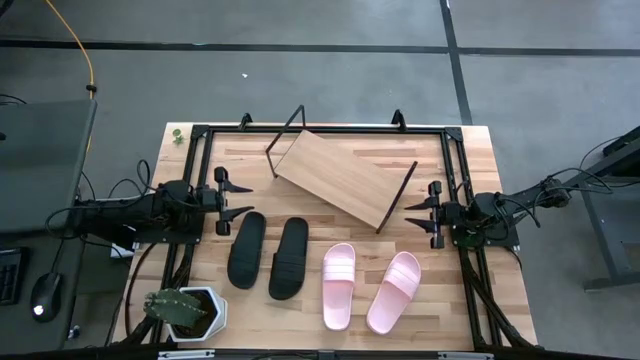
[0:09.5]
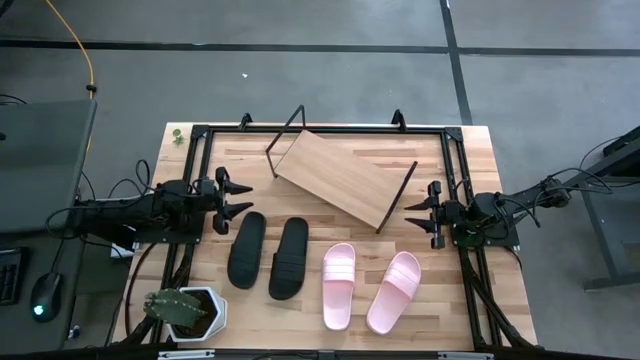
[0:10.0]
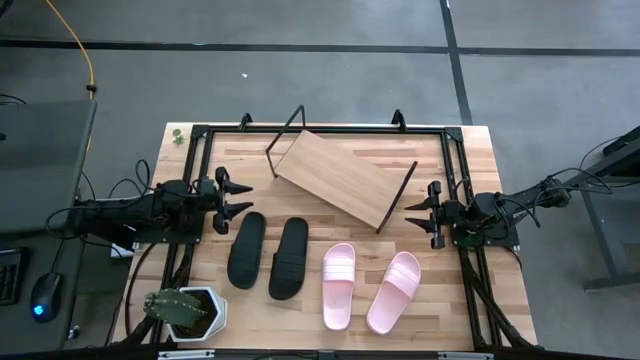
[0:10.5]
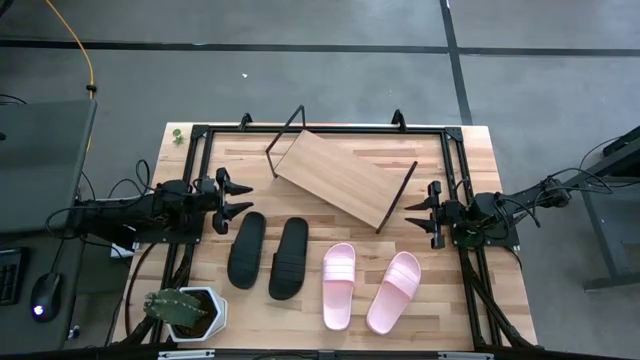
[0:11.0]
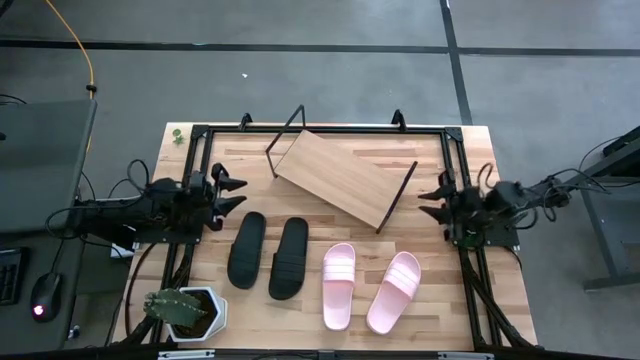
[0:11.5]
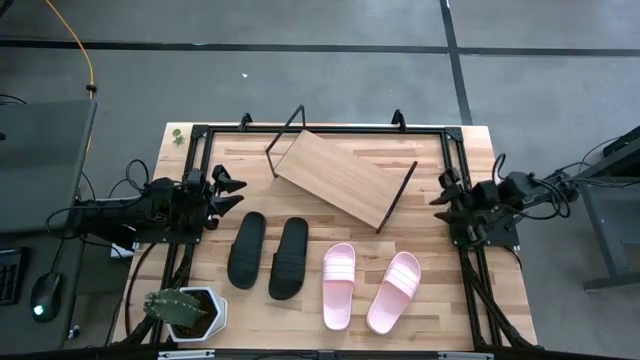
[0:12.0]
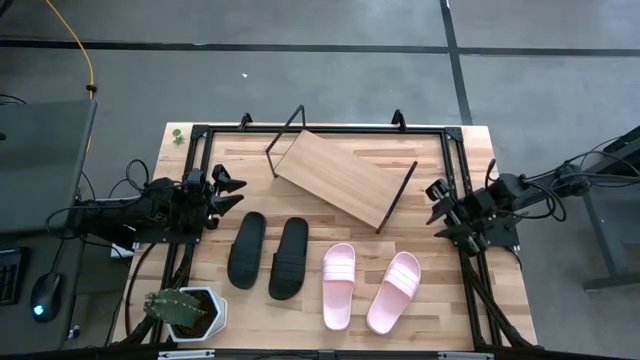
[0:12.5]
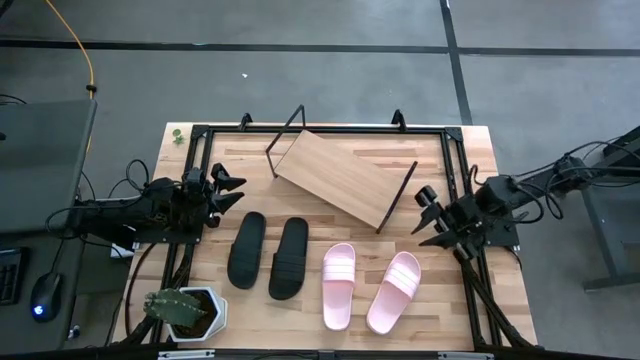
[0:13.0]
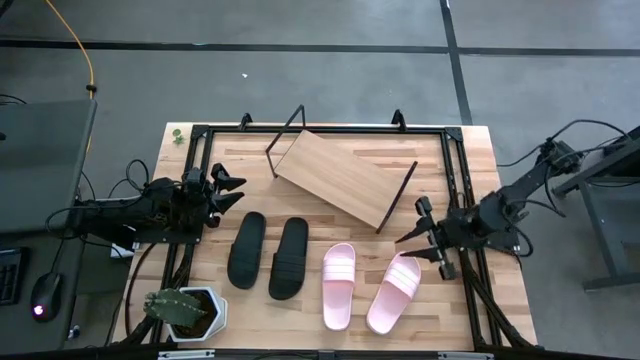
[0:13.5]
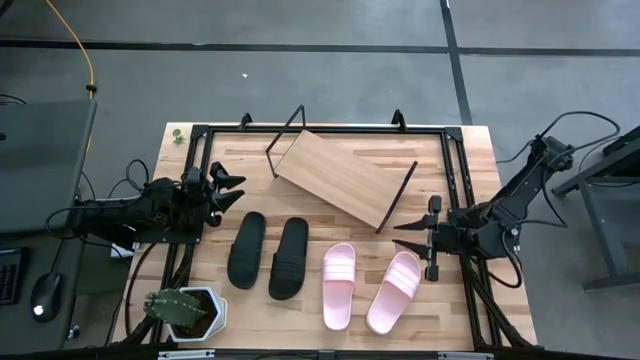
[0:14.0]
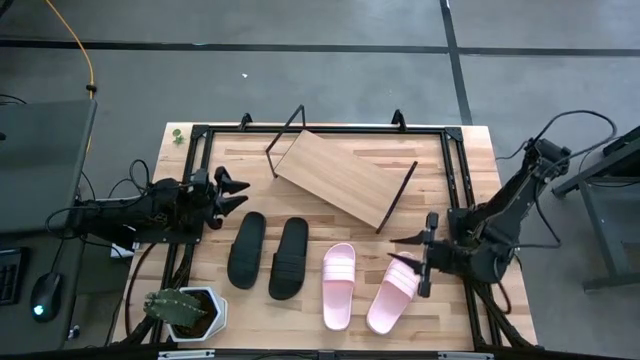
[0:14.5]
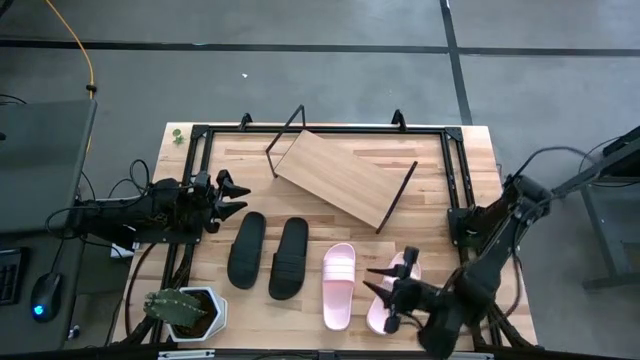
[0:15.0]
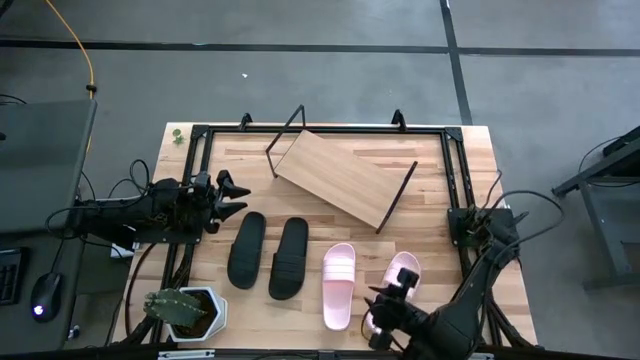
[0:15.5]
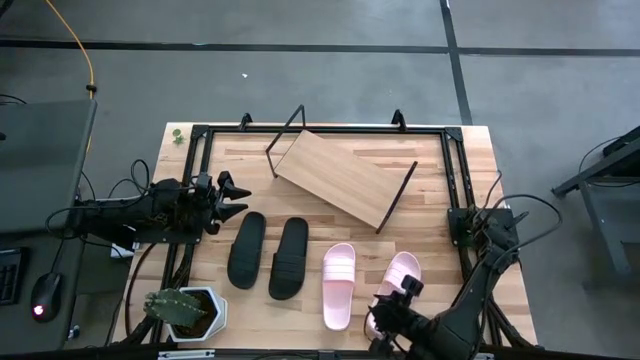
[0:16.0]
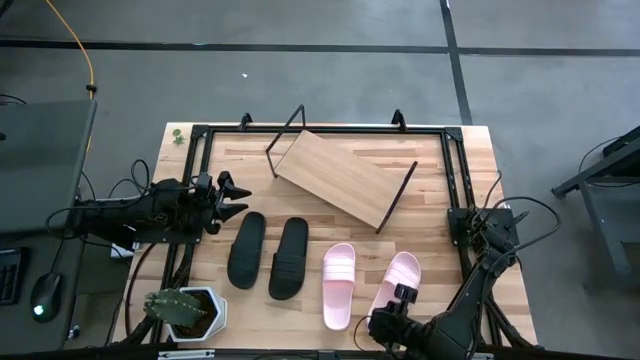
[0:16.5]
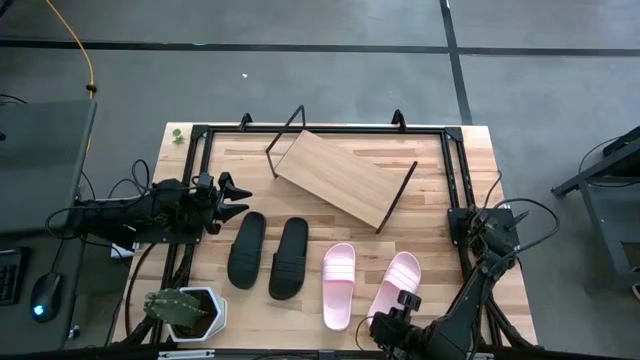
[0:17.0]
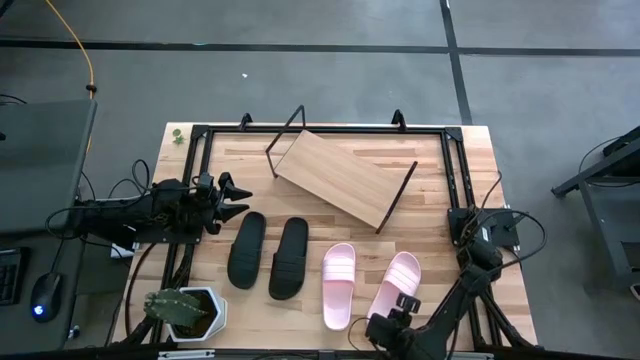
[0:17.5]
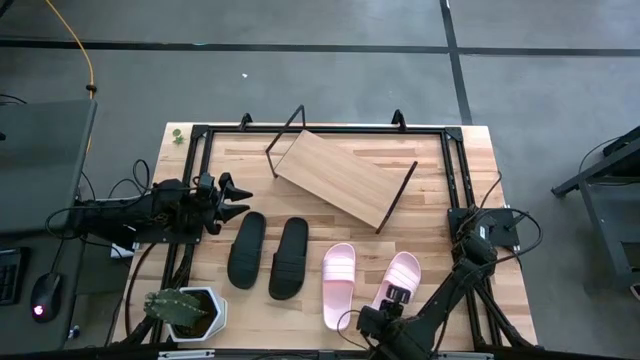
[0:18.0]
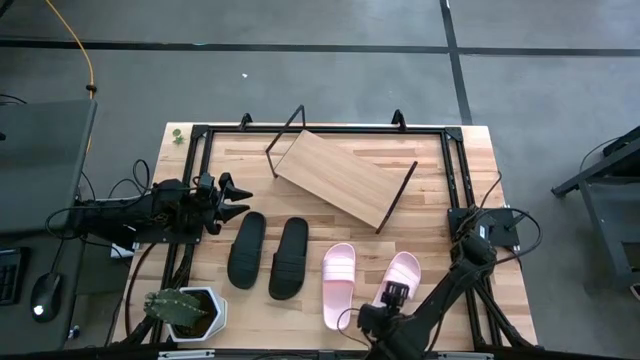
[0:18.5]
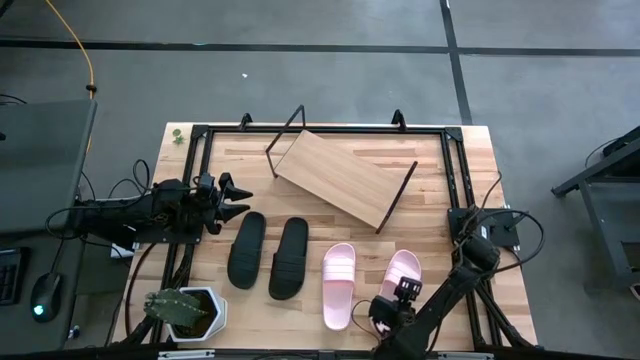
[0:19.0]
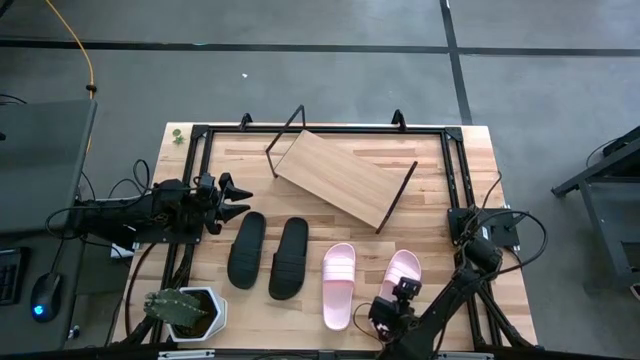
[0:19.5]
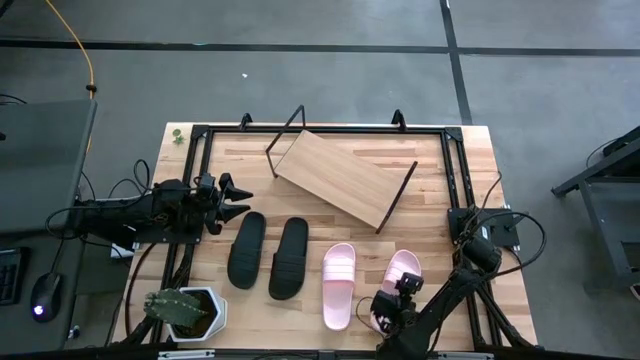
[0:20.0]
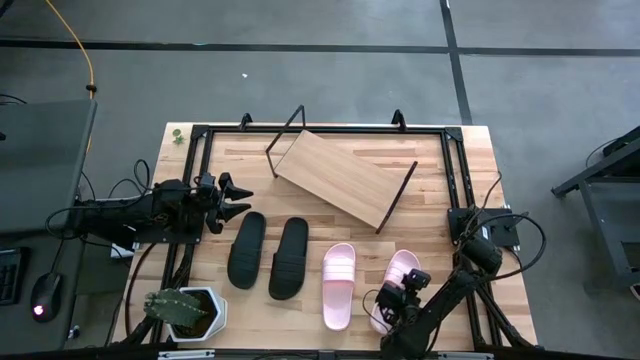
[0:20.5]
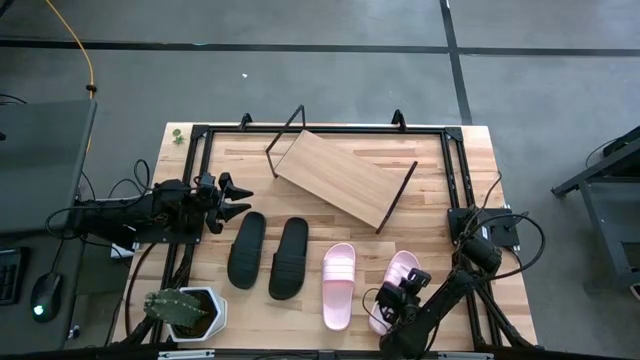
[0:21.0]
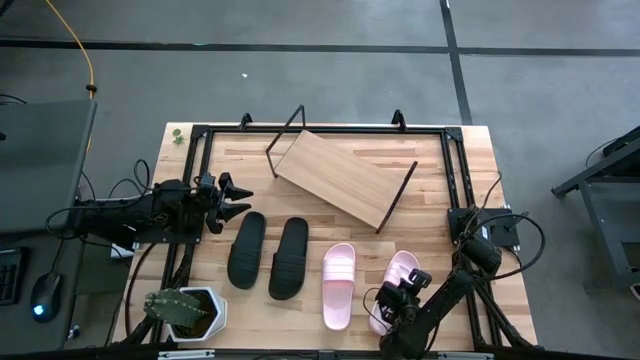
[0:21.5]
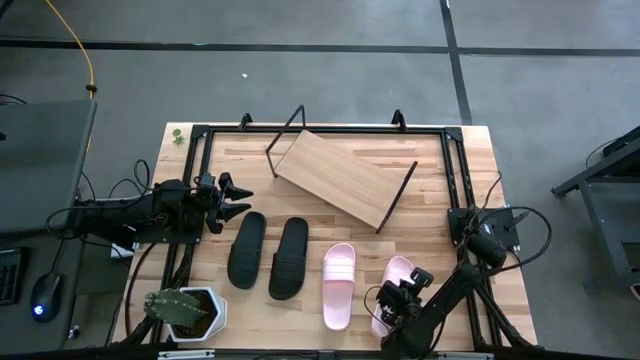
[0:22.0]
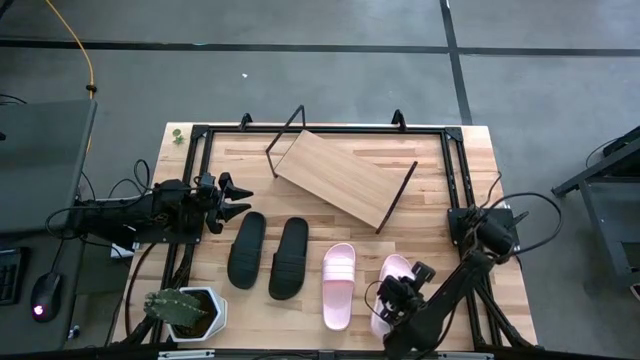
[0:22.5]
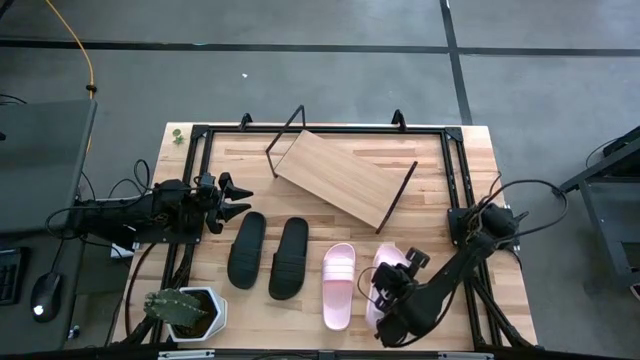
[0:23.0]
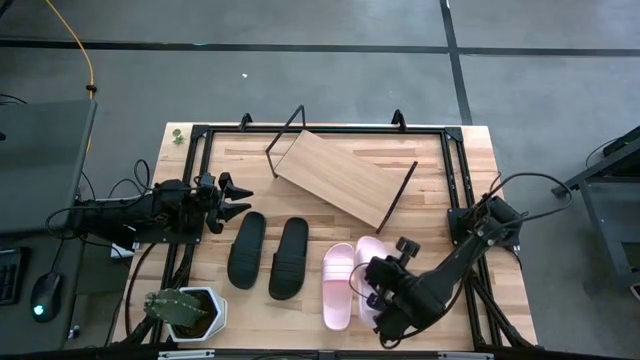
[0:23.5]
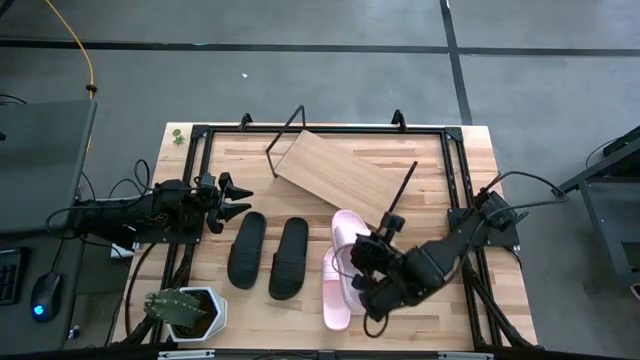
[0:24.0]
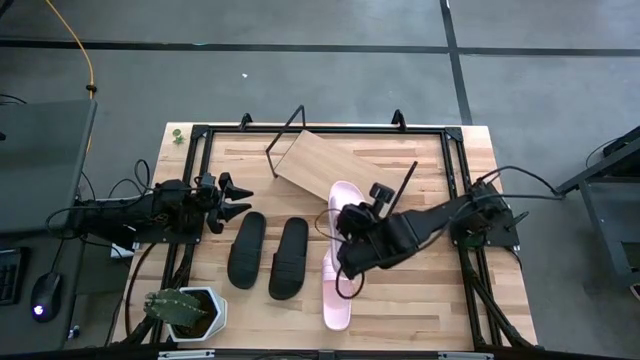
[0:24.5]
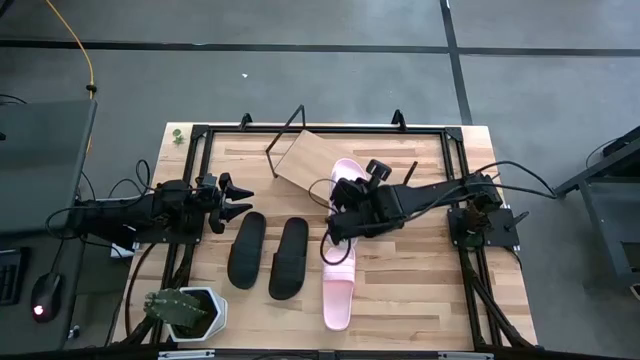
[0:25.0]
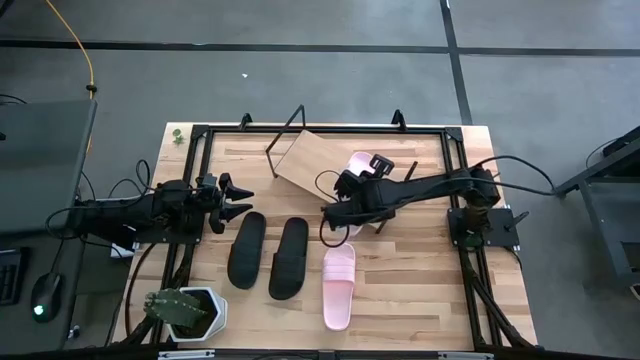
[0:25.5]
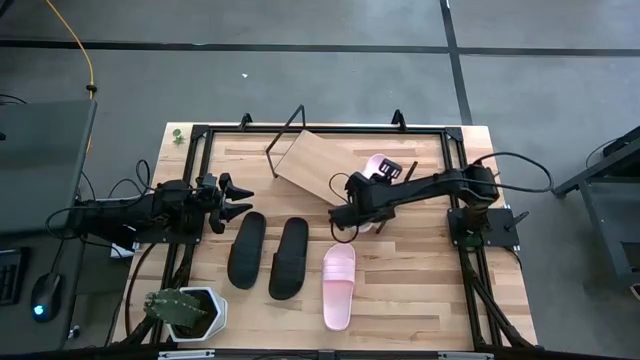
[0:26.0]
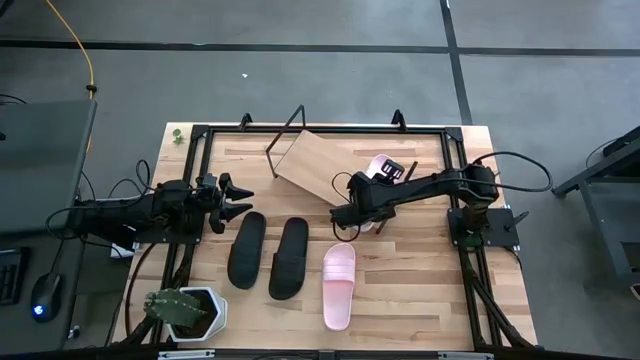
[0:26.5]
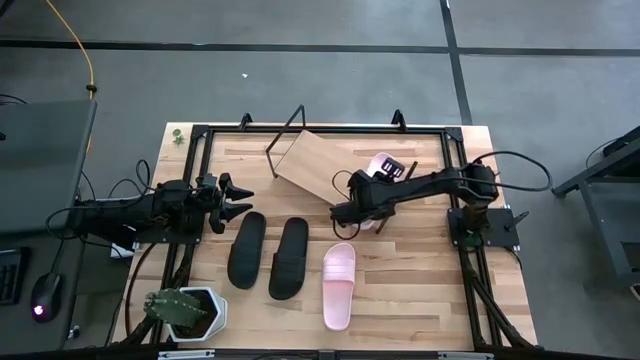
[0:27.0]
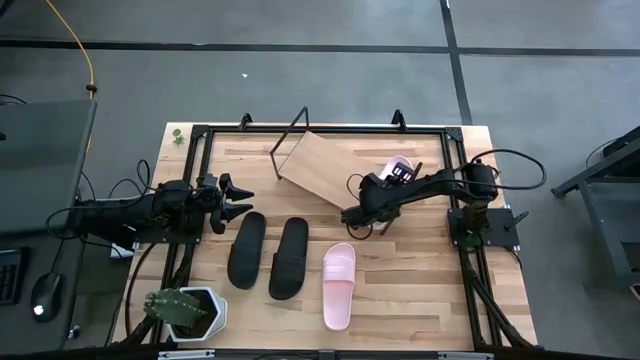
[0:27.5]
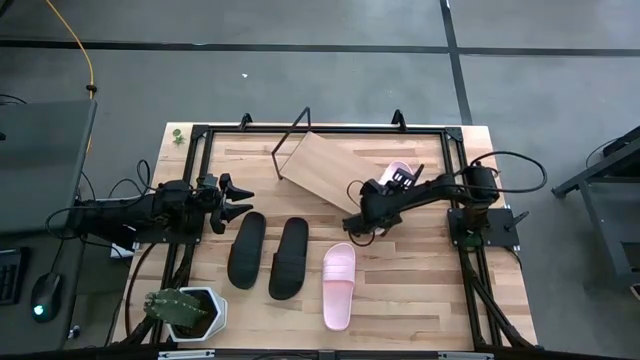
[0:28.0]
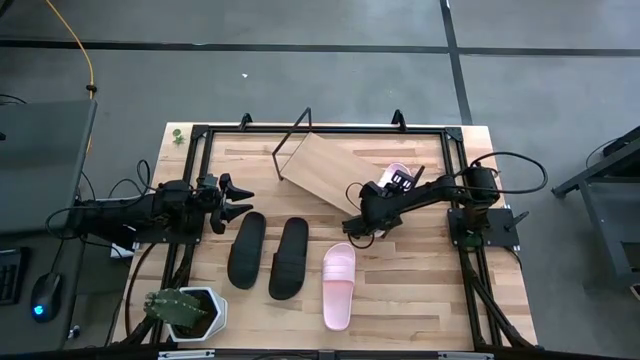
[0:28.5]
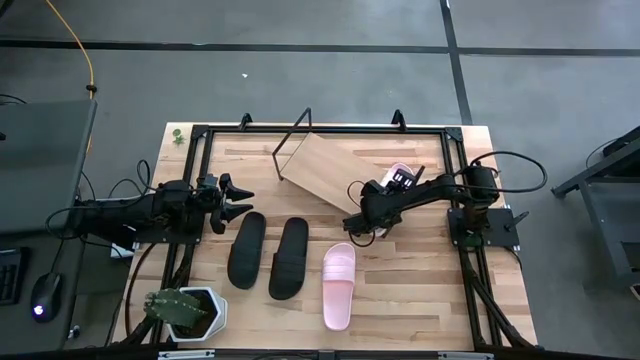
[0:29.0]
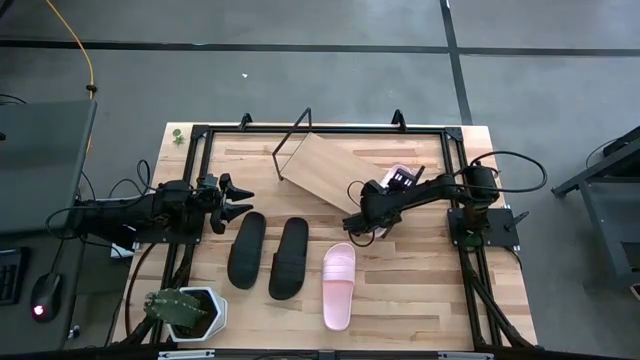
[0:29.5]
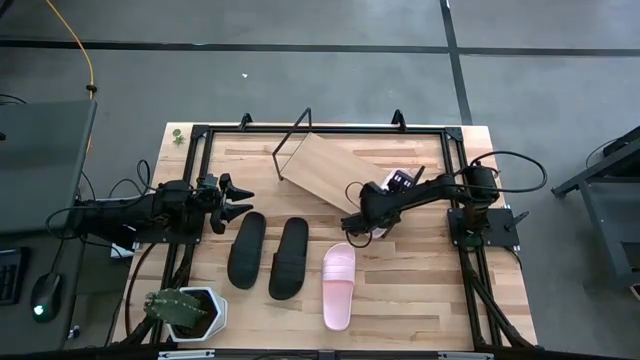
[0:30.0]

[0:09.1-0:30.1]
Task: Pick and place slides into the shelf
Put the right pink slide on the shelf
